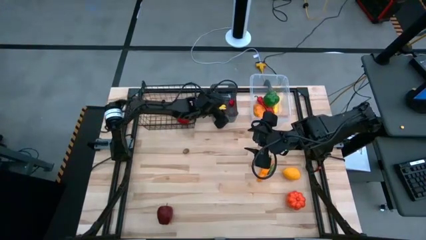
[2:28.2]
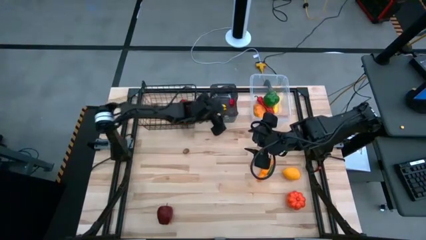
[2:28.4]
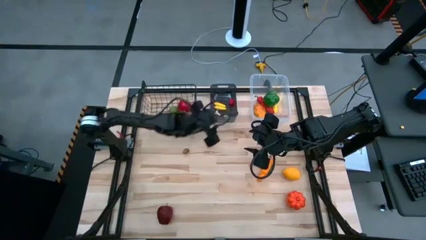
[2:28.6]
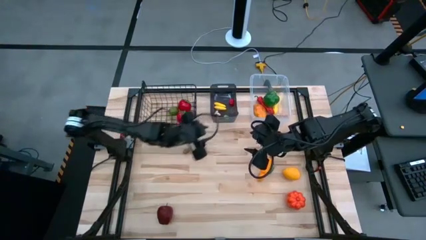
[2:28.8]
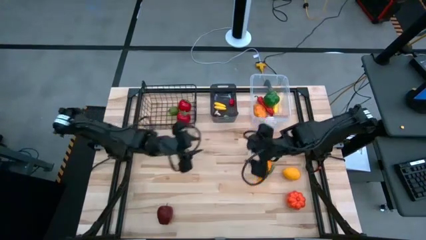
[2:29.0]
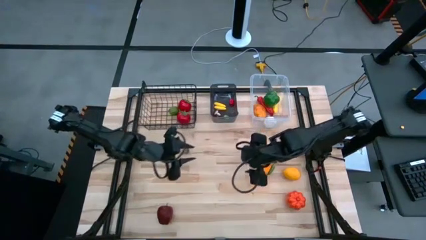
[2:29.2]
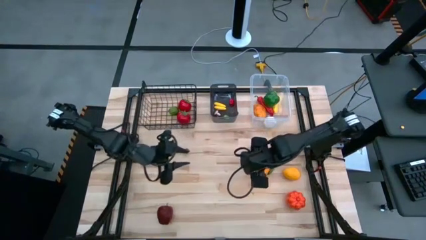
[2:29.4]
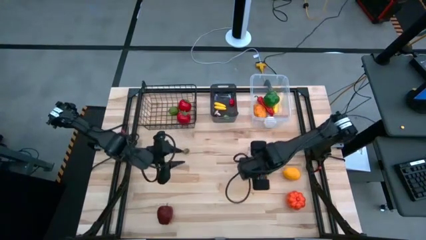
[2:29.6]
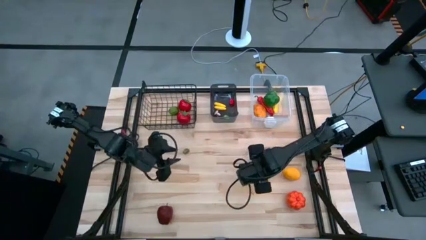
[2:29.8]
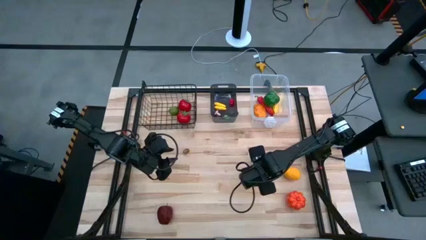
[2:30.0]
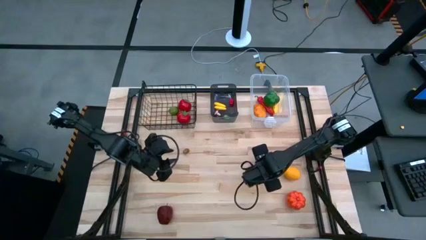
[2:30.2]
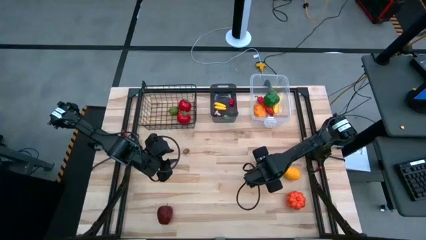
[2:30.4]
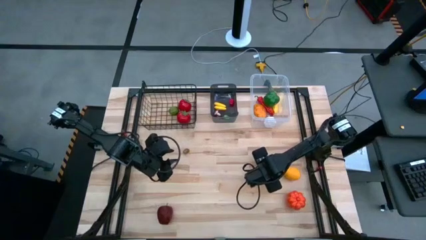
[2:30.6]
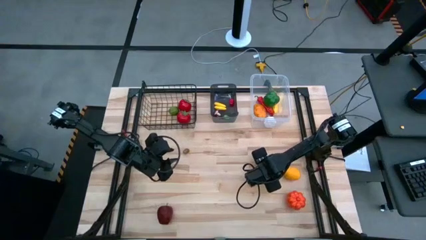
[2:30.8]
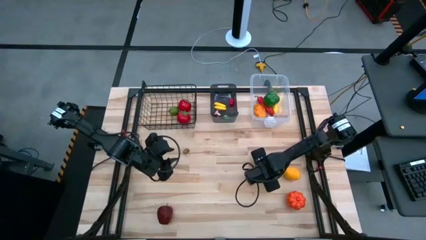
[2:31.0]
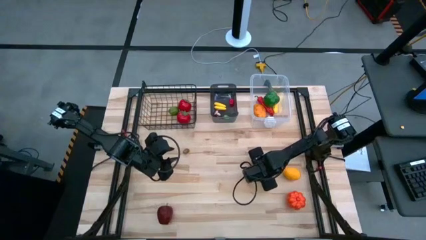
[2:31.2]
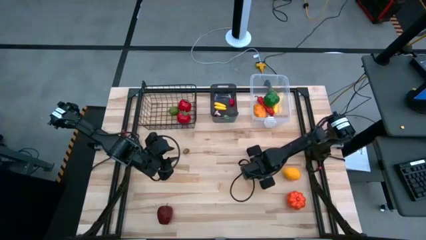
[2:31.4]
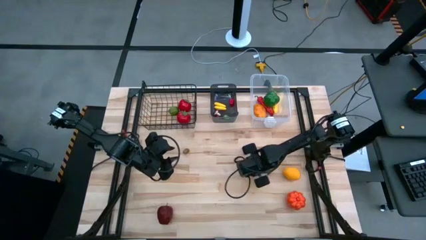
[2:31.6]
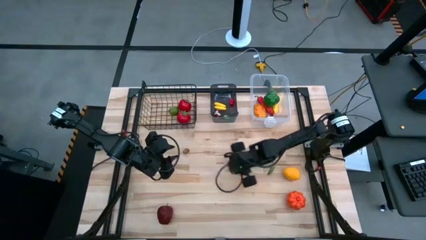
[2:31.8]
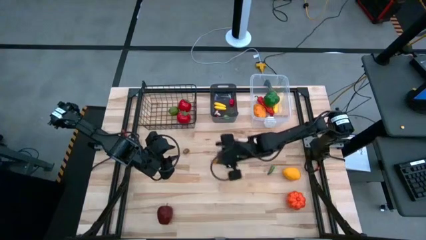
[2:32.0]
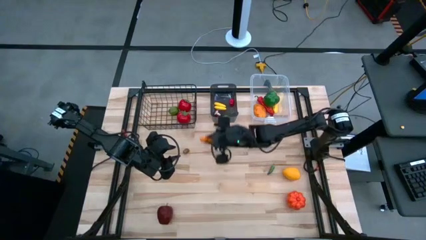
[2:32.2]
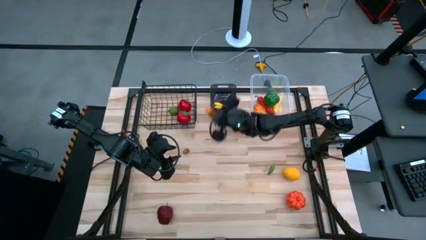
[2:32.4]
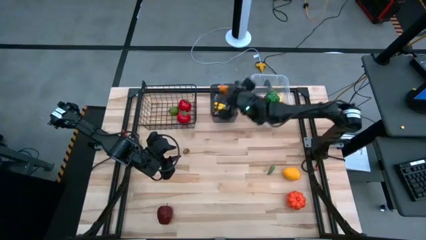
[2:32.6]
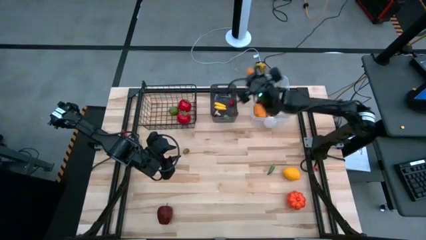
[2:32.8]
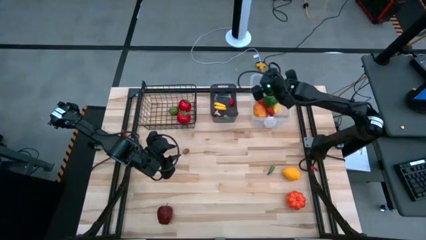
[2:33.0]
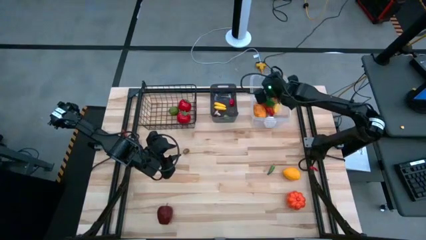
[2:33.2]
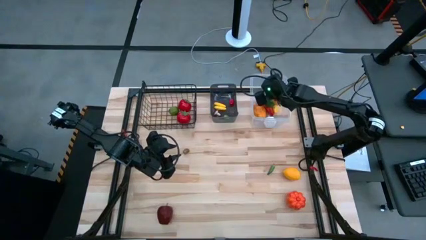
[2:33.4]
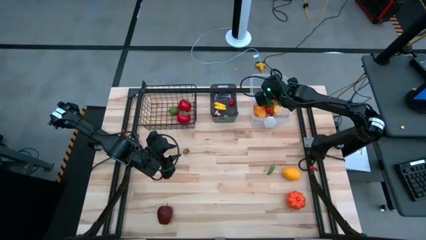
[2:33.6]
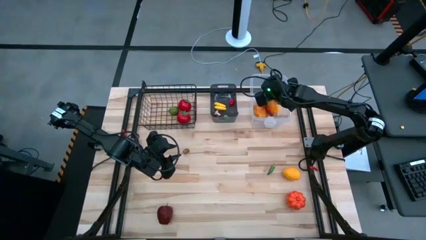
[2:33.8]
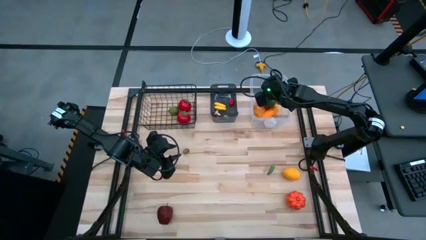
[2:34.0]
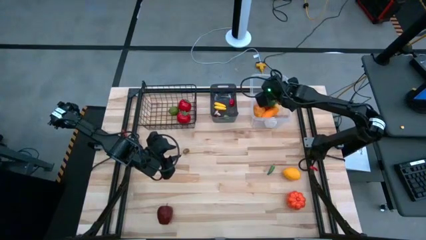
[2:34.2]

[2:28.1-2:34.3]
Task: Sort produce into baskets
Put the orange chili pepper into the transparent bin

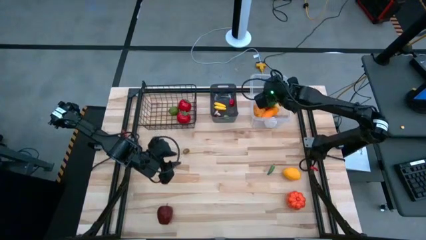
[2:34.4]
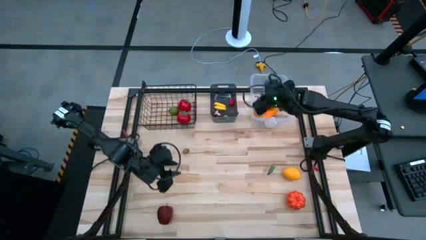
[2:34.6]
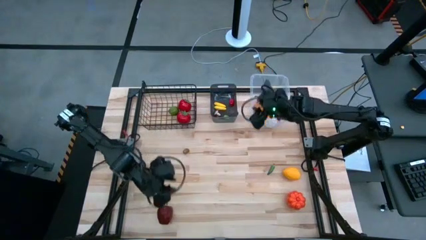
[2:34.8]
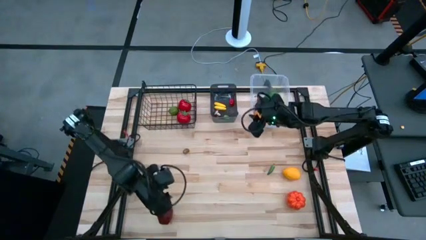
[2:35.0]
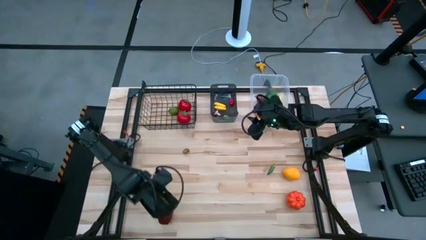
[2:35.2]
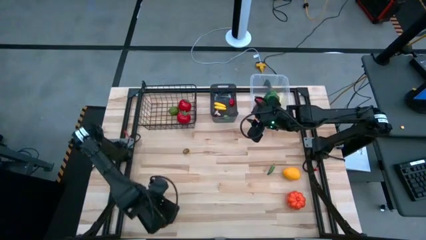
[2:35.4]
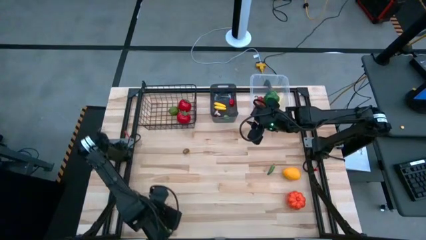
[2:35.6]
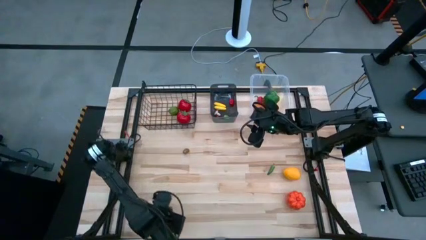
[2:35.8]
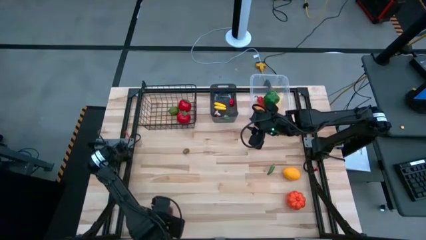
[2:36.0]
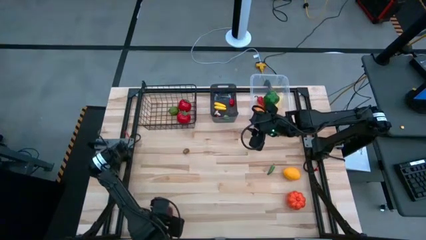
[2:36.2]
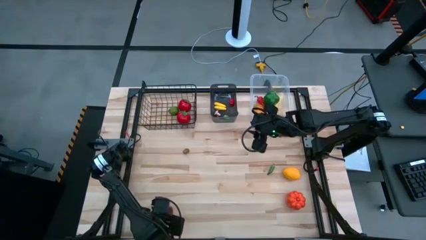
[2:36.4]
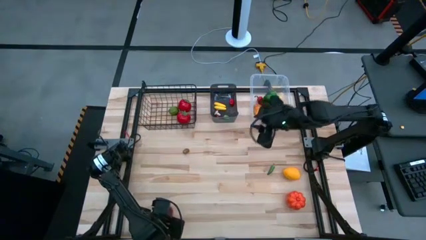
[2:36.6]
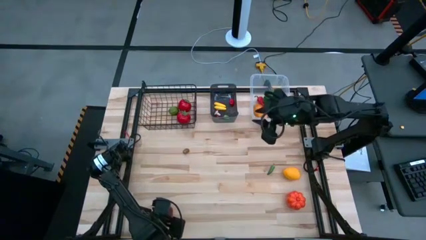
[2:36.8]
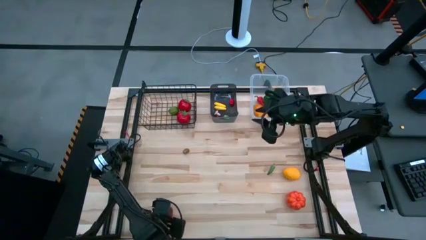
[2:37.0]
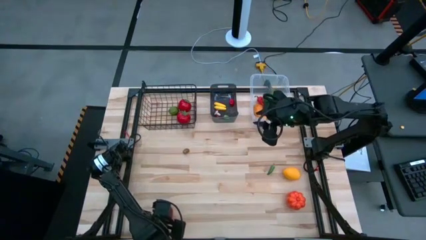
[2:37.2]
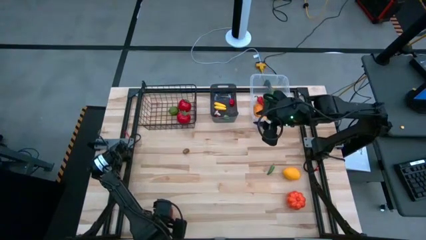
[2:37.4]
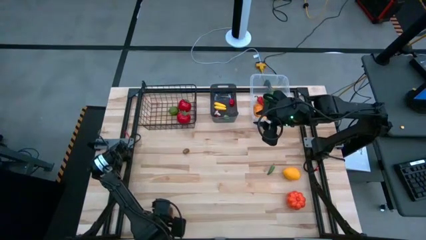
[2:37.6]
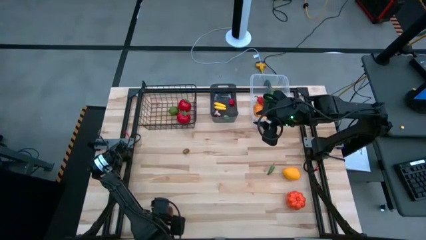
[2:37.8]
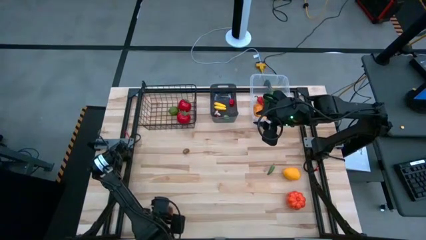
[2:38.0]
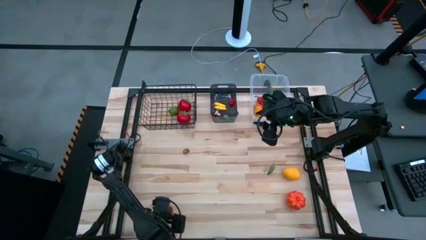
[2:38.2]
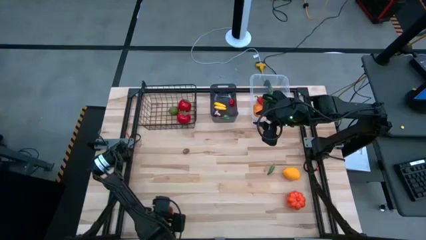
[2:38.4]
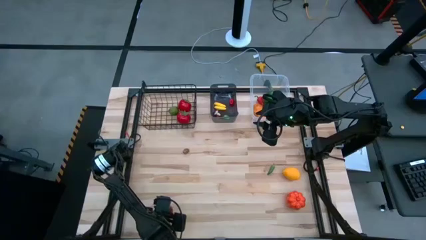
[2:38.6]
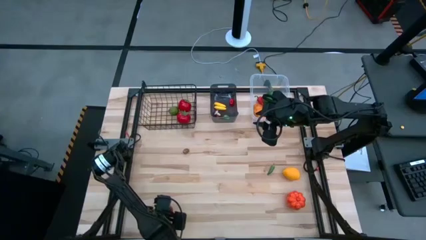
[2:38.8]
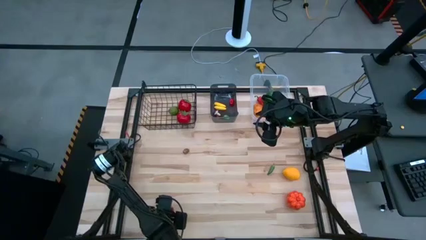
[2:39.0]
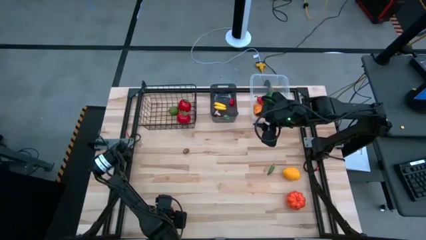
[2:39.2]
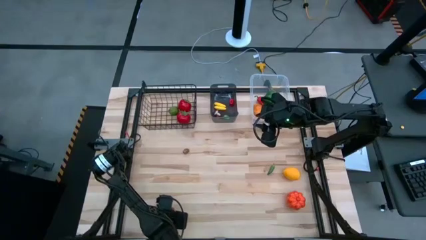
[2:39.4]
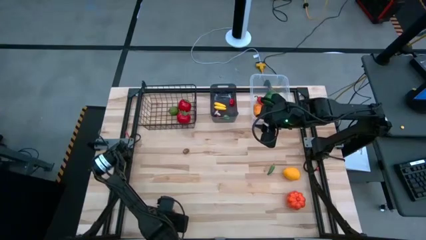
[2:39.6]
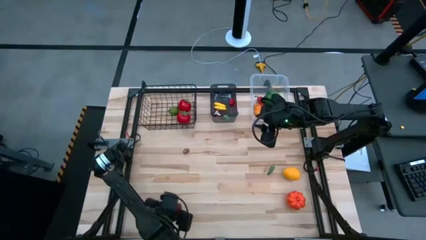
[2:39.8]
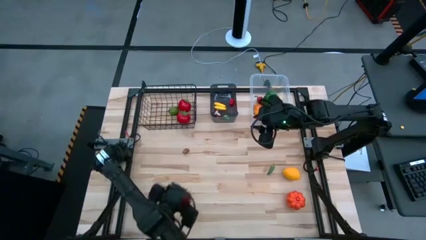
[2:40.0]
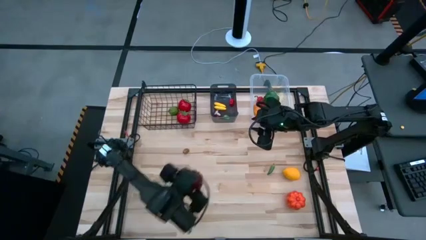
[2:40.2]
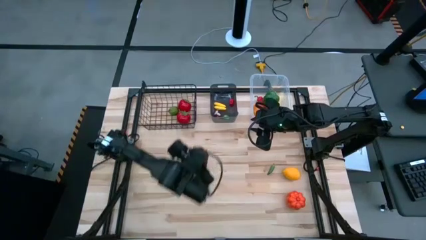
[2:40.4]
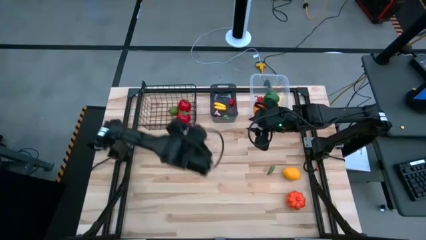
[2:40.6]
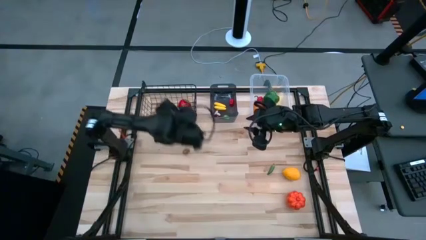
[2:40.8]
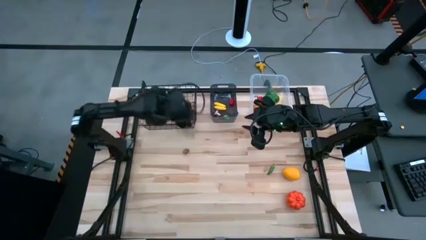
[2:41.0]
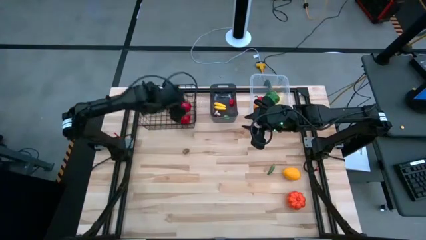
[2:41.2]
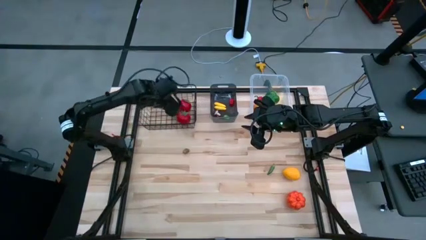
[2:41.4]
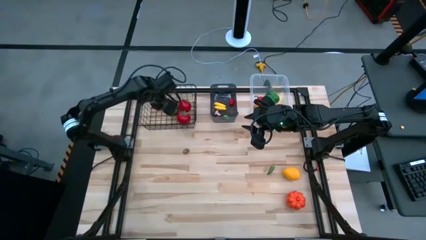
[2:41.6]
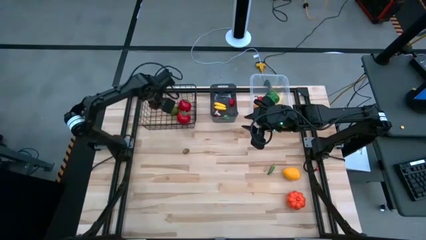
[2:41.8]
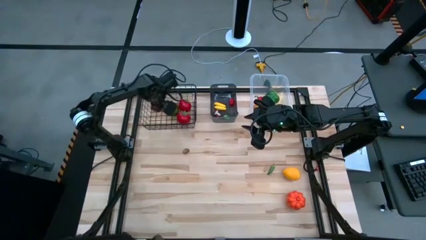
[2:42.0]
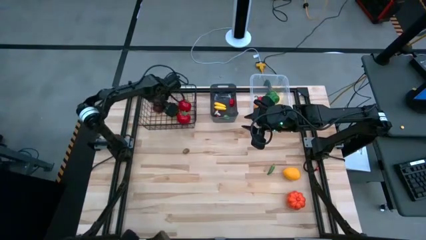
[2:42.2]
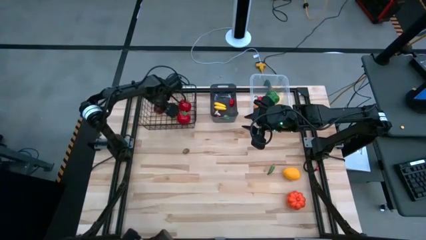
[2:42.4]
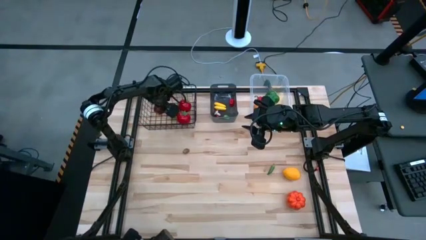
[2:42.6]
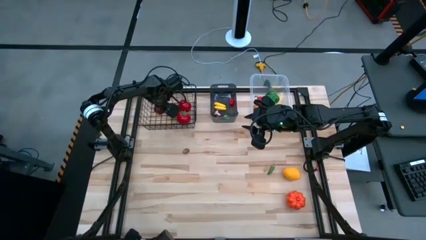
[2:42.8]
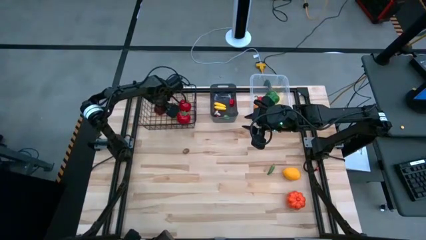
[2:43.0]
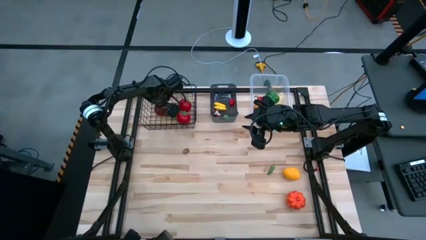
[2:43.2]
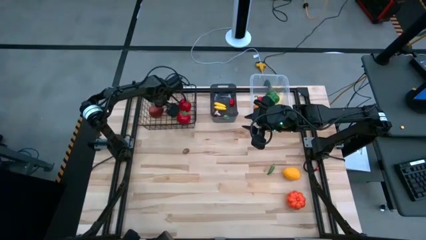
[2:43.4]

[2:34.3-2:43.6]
Put the apple into the black basket
